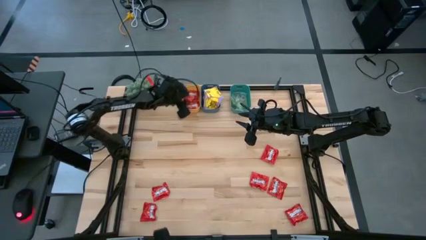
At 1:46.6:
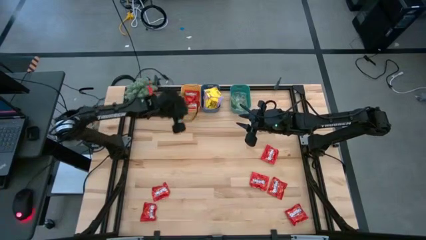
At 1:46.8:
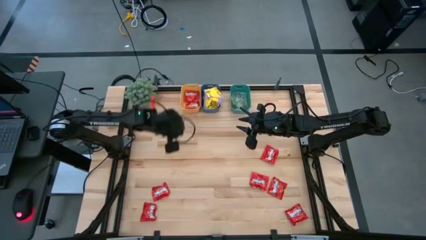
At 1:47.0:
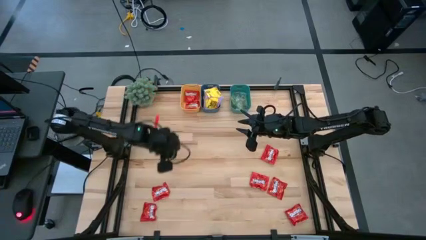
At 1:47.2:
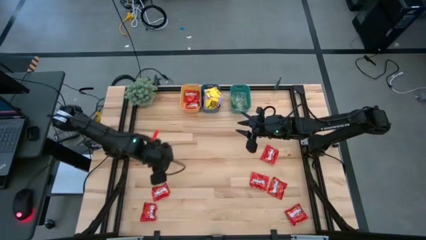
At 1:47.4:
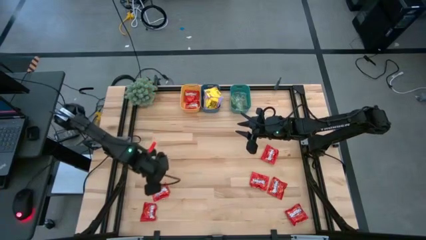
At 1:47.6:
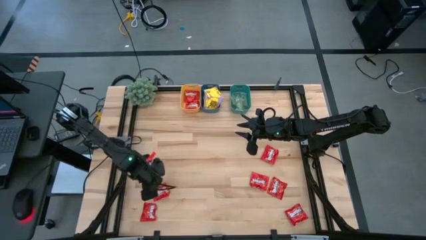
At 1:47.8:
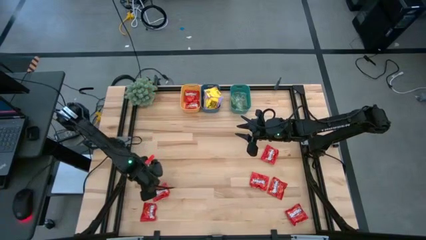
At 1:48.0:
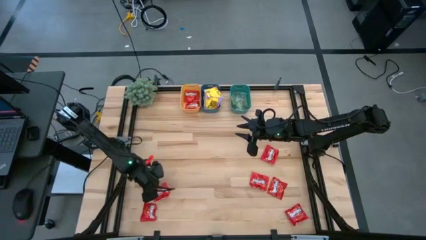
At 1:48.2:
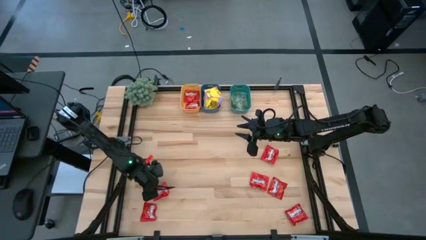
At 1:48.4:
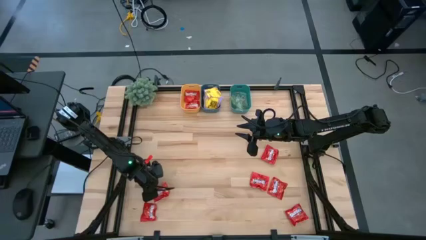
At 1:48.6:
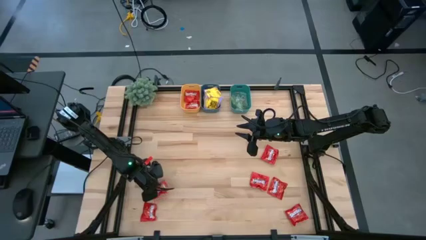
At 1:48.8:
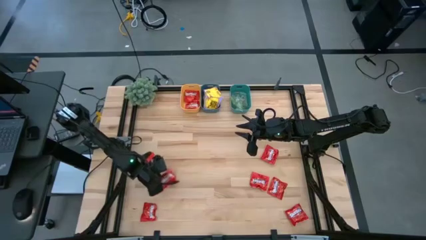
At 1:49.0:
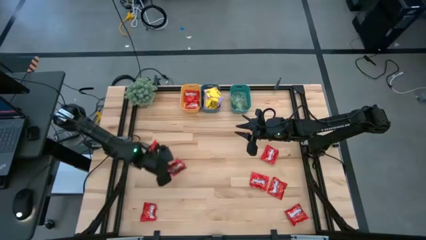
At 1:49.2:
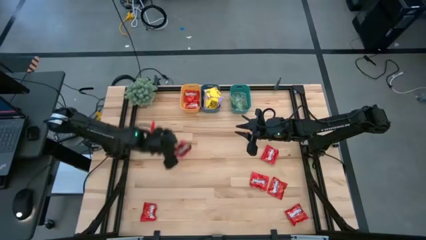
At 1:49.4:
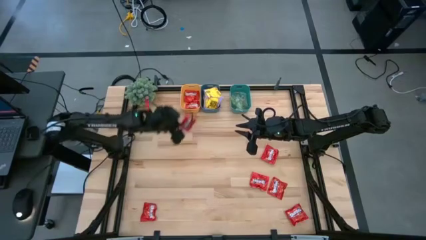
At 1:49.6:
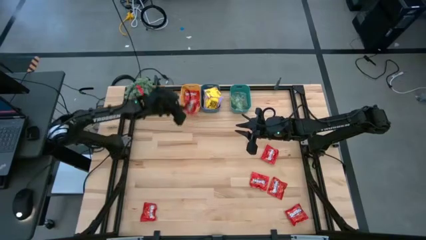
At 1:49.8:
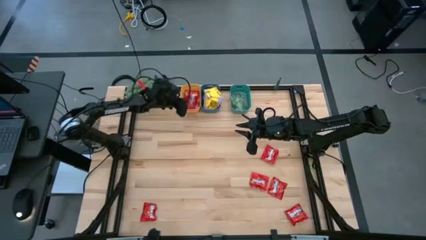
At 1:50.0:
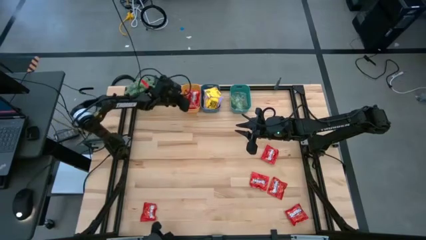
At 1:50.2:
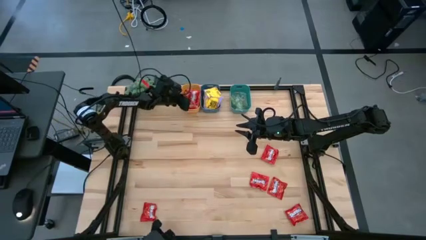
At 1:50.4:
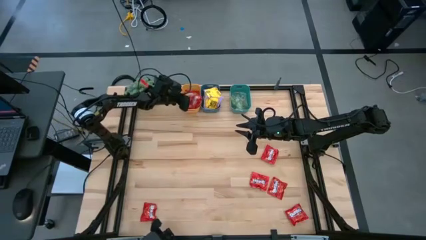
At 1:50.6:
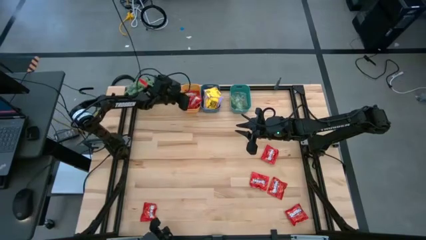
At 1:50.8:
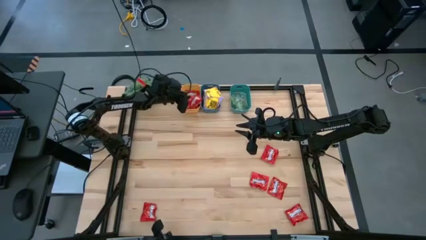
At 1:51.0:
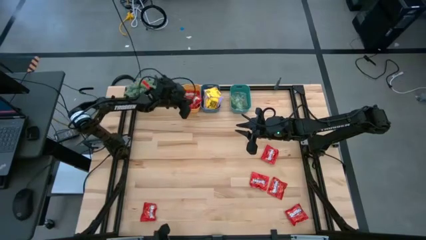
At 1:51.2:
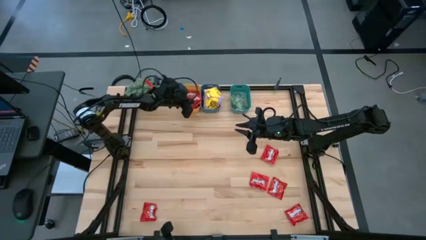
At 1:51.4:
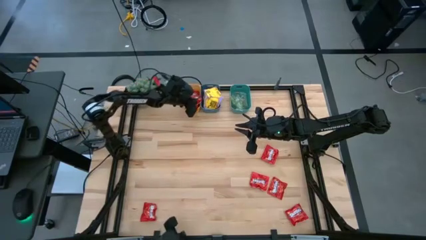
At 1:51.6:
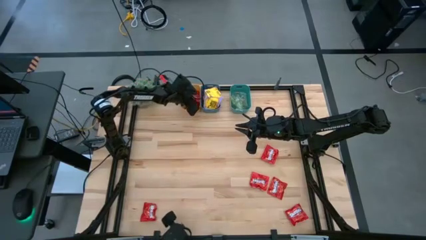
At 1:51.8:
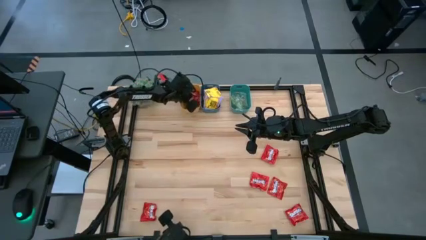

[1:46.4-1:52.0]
Task: Sort candy
Put the red candy pack into the yellow bin

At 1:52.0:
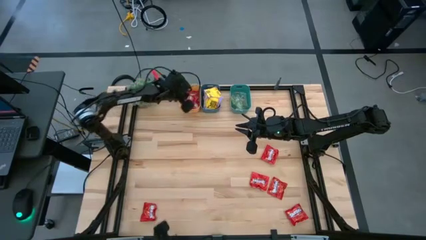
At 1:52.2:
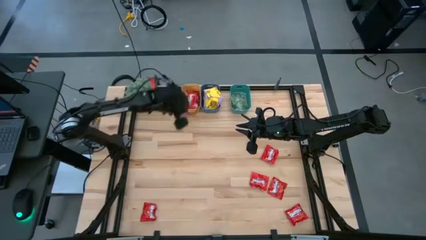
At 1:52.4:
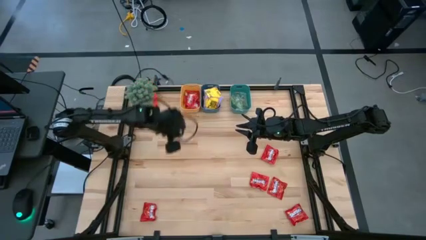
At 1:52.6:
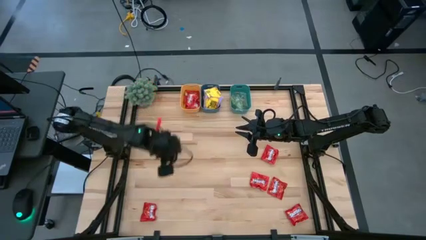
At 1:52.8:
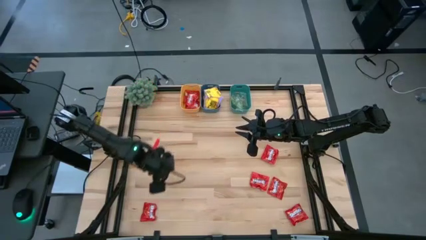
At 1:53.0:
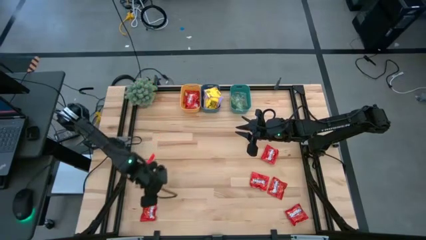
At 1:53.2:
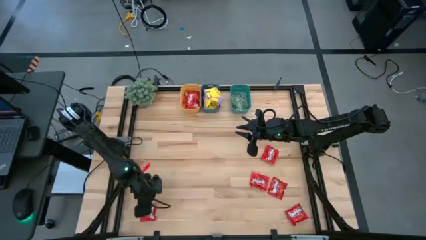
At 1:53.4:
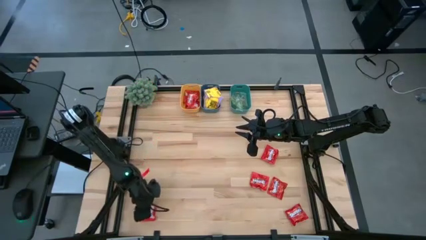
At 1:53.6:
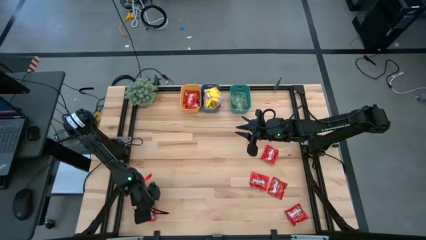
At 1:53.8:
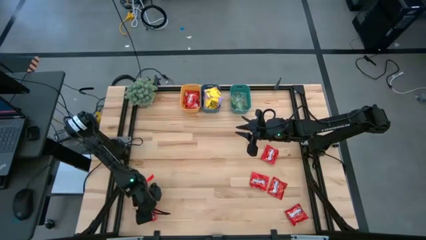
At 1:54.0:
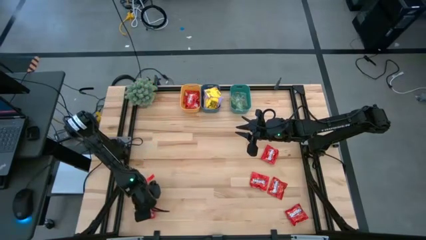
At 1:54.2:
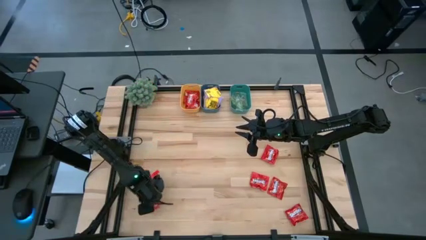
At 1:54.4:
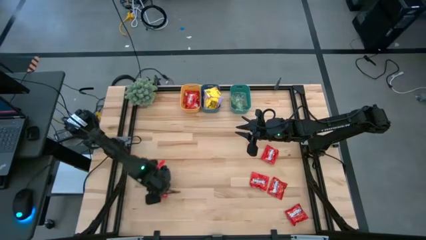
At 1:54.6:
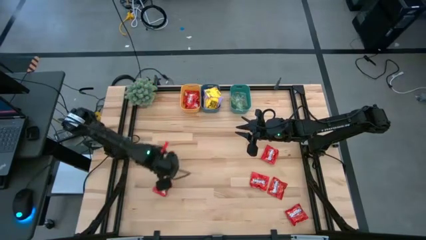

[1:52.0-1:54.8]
Put the red candy pack into the yellow bin

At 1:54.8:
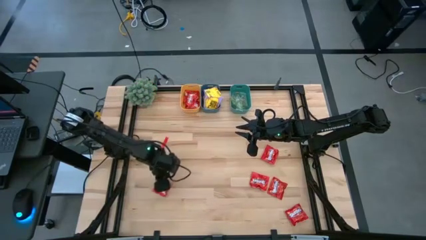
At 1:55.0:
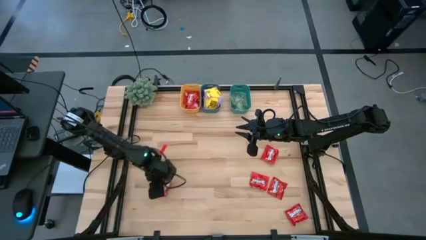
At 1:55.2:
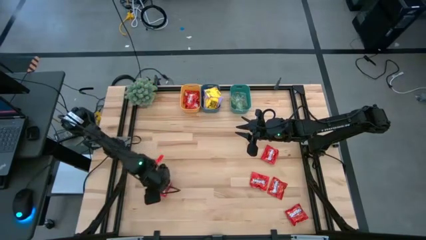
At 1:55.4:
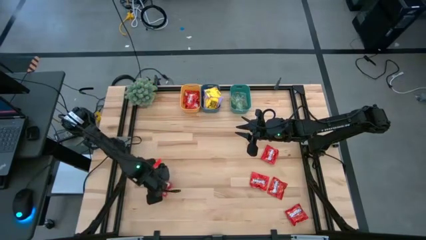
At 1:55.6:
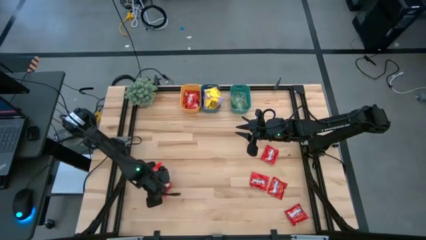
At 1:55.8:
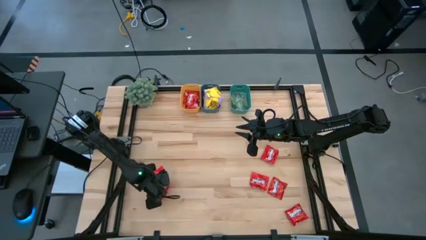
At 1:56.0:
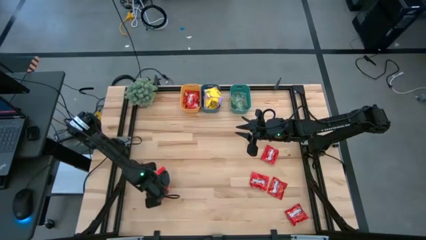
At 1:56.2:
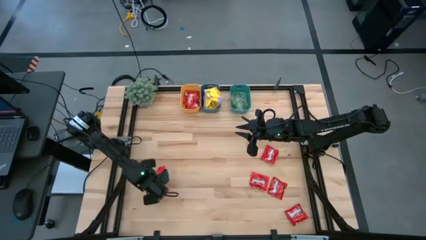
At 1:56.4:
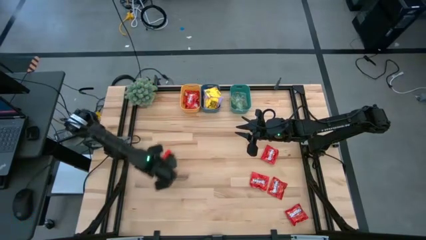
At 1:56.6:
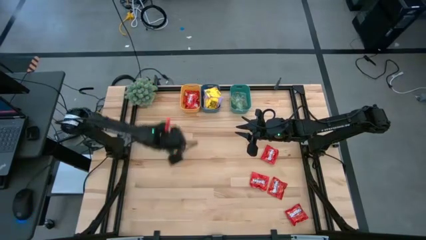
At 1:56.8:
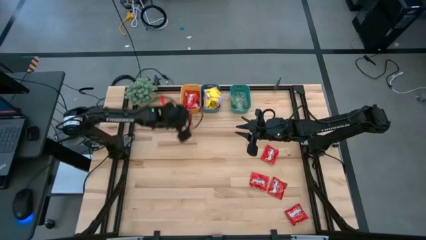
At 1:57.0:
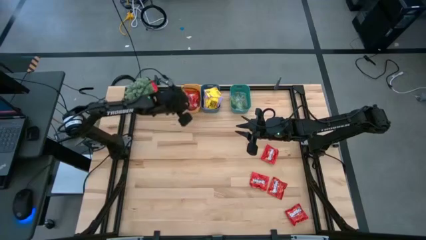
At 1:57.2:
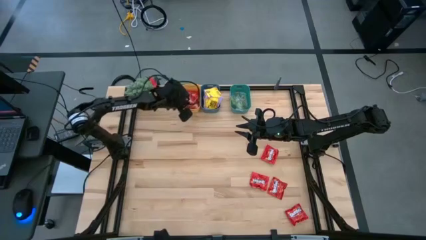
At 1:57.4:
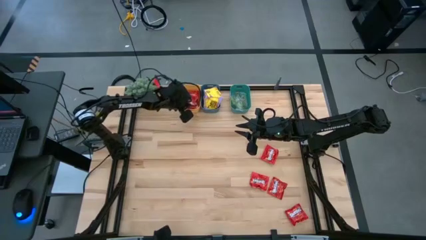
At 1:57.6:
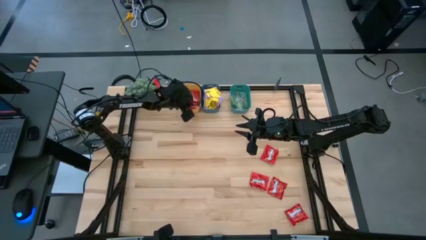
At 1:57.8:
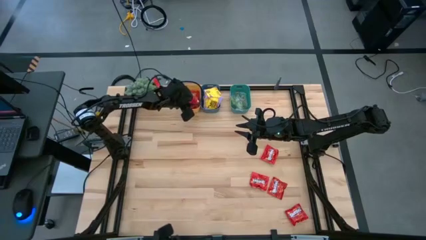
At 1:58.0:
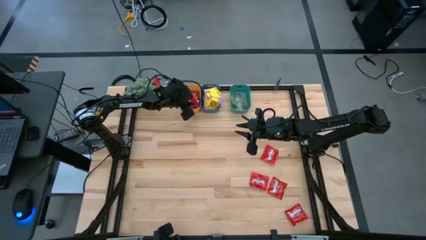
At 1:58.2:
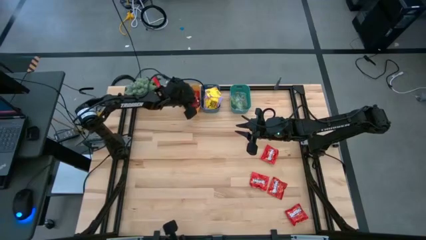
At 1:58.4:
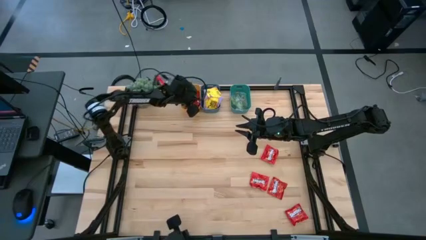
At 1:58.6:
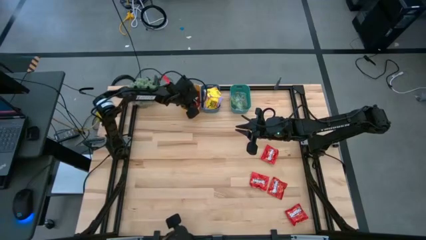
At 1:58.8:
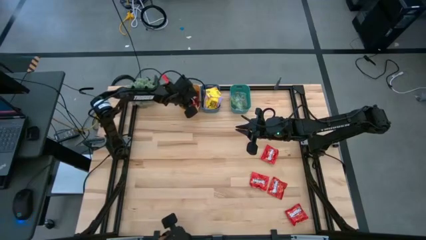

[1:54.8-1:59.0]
Put the red candy pack into the yellow bin

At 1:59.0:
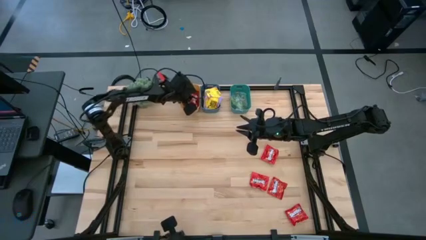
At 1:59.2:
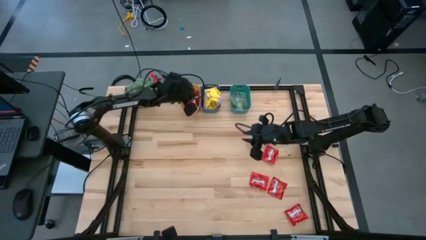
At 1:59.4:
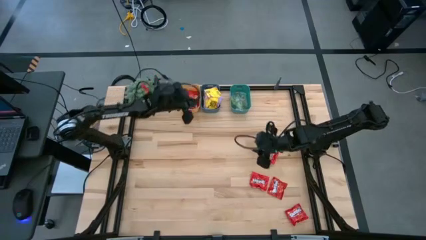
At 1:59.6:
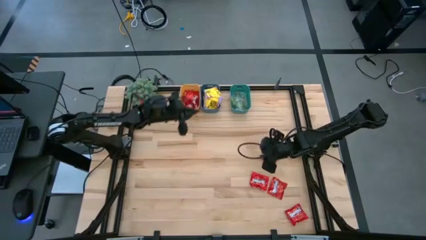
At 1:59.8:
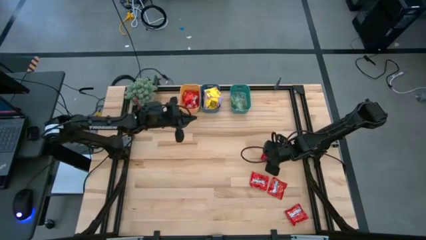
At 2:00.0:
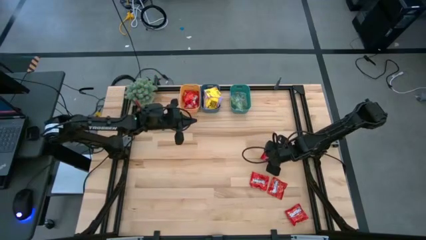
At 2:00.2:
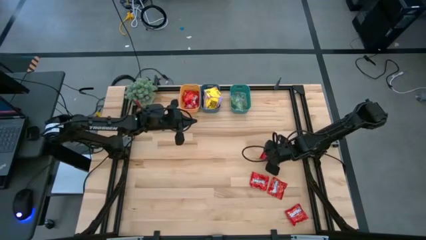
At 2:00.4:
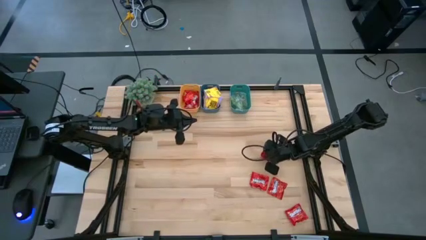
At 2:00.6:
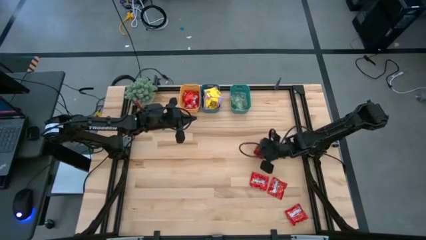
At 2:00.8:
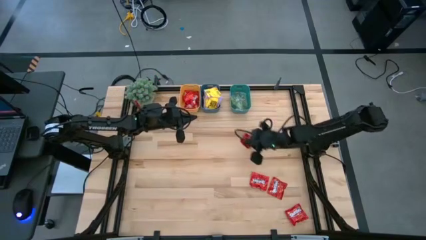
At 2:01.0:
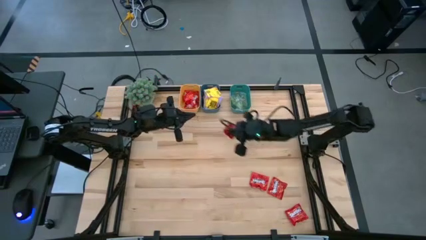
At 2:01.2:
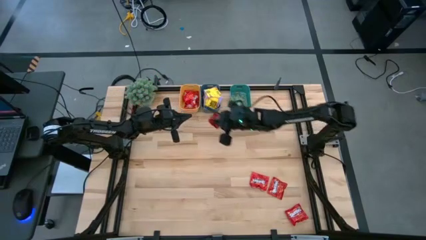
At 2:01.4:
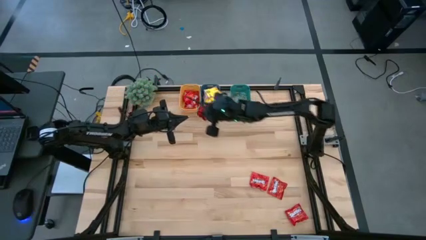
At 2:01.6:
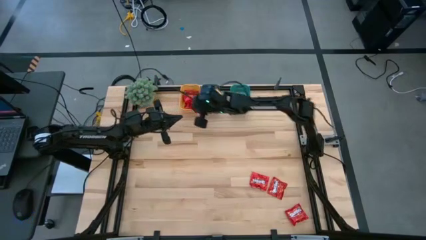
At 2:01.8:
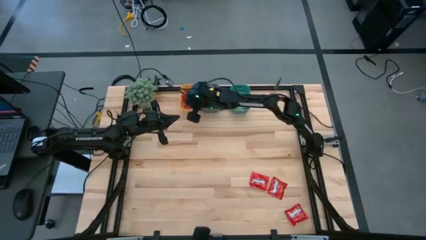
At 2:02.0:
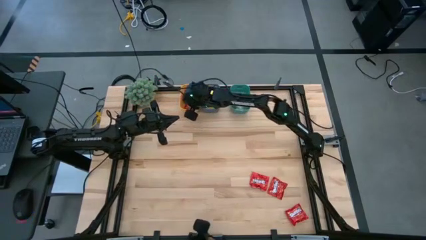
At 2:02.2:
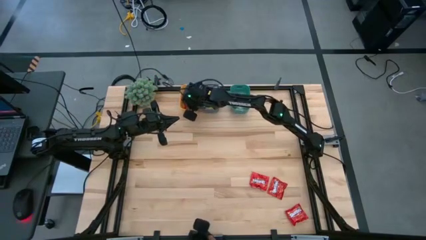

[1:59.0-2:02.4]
Put the red candy pack into the yellow bin
